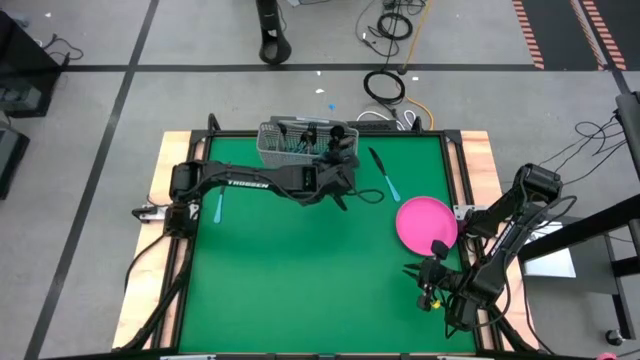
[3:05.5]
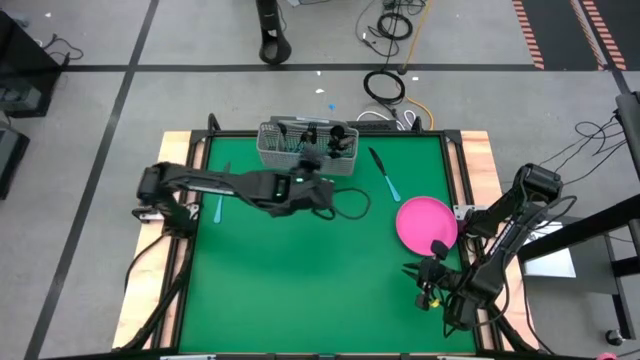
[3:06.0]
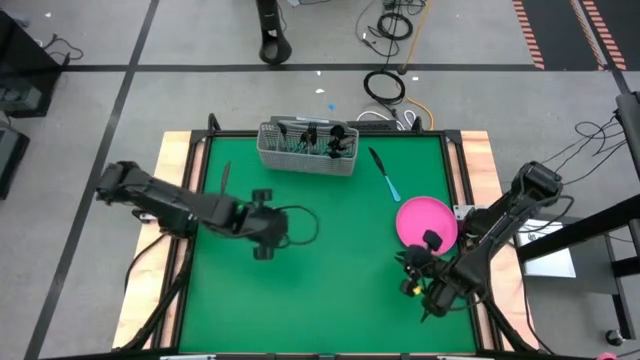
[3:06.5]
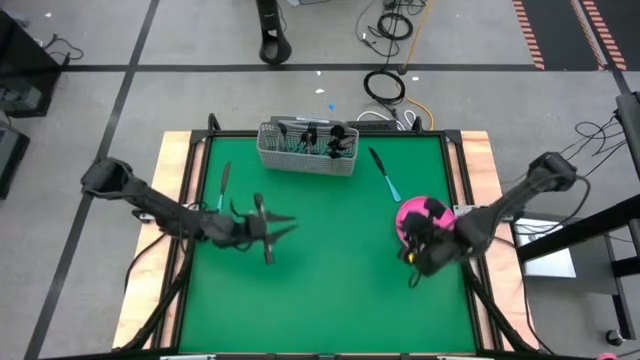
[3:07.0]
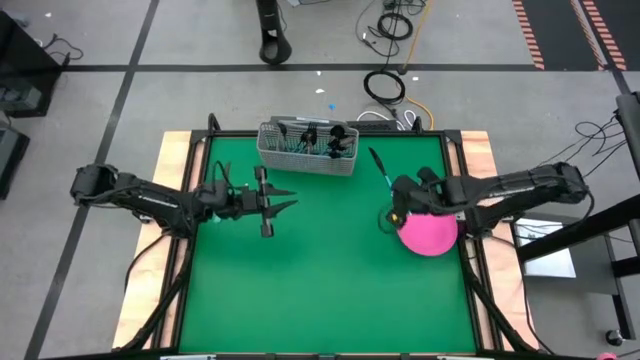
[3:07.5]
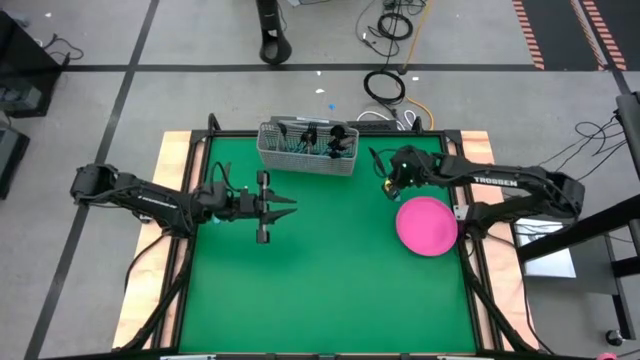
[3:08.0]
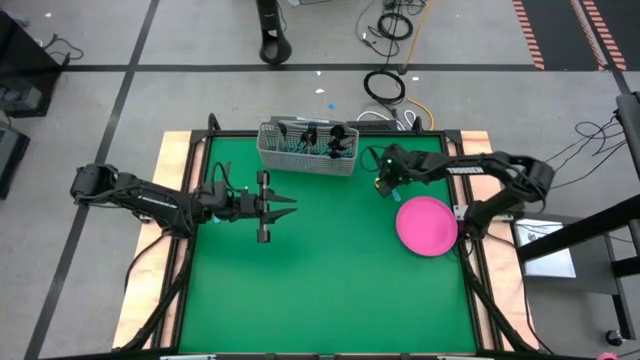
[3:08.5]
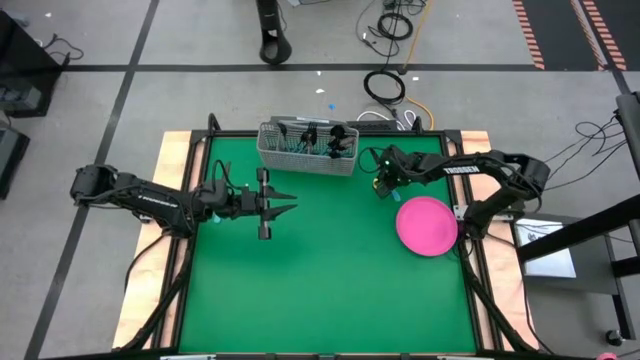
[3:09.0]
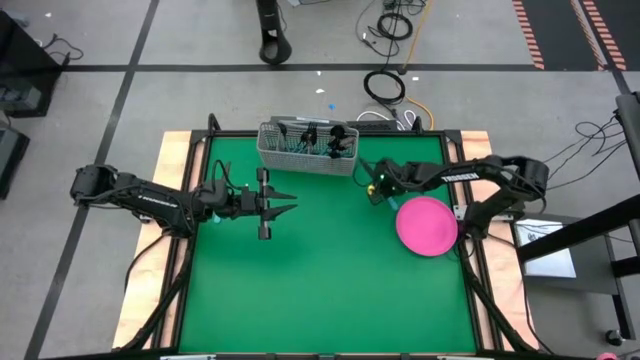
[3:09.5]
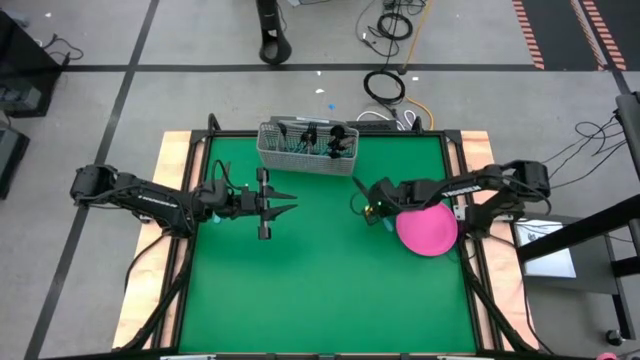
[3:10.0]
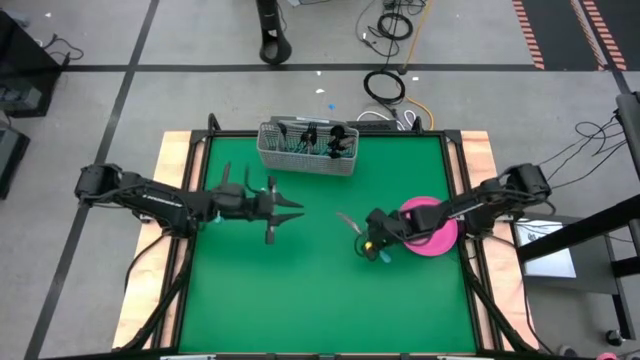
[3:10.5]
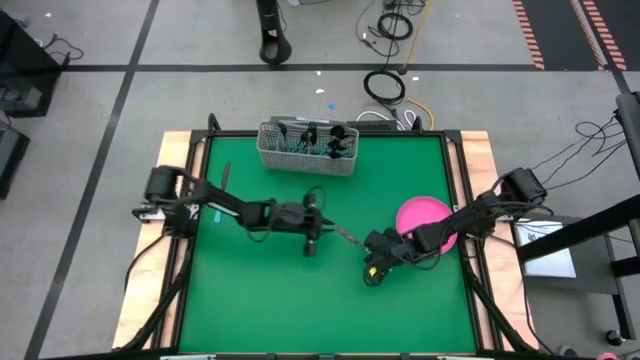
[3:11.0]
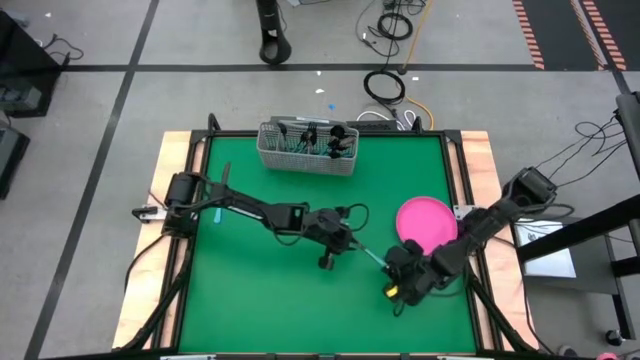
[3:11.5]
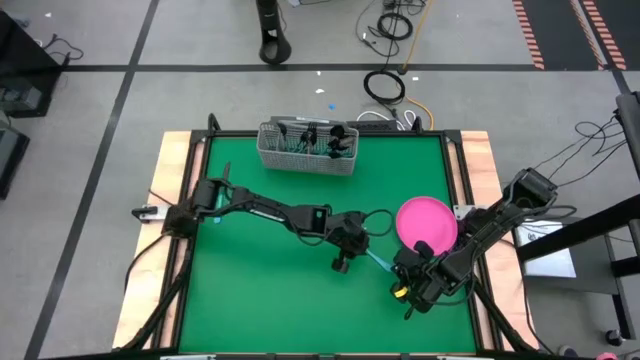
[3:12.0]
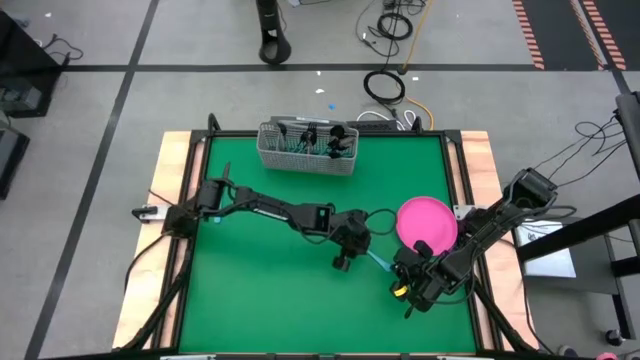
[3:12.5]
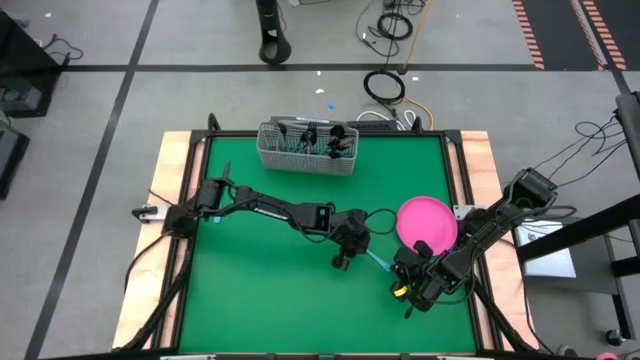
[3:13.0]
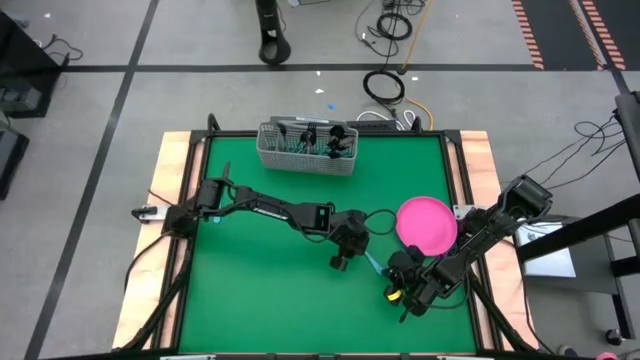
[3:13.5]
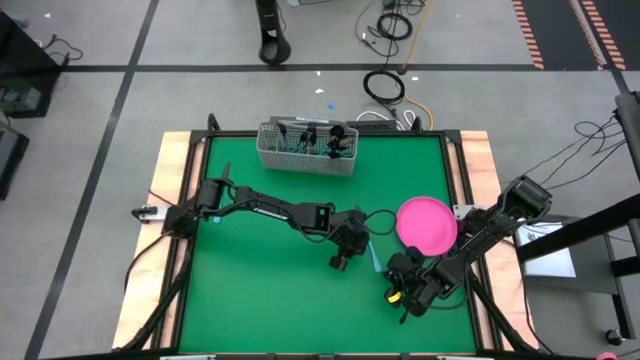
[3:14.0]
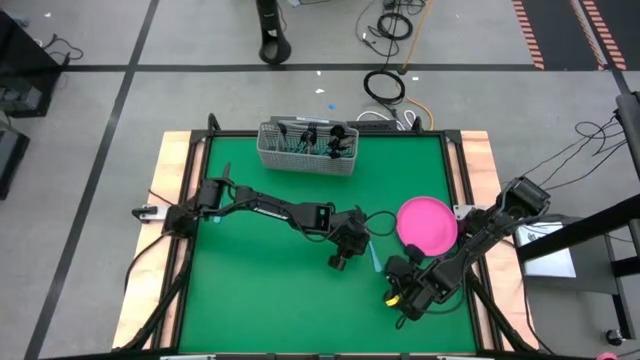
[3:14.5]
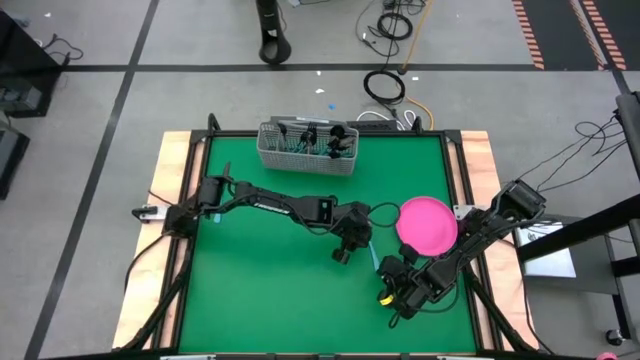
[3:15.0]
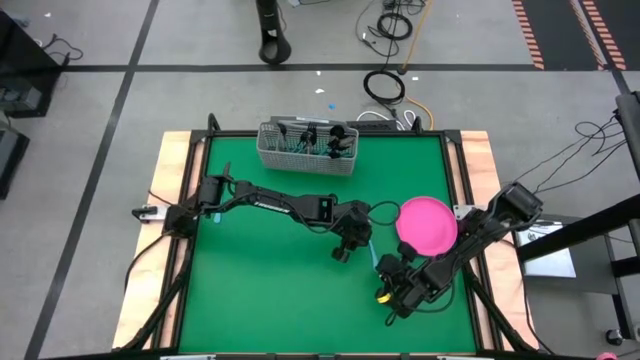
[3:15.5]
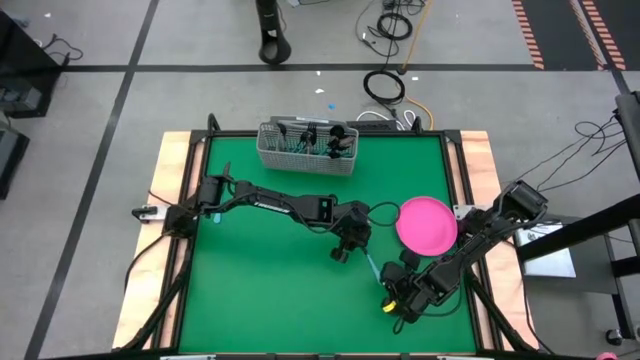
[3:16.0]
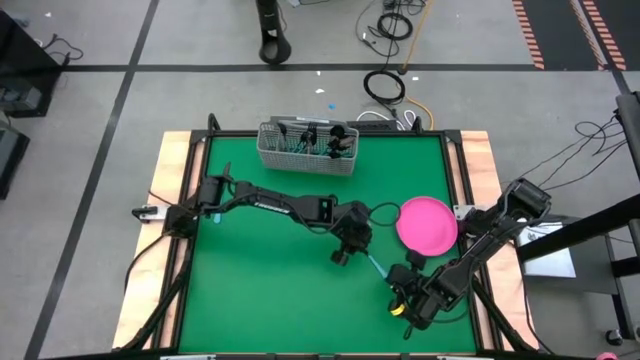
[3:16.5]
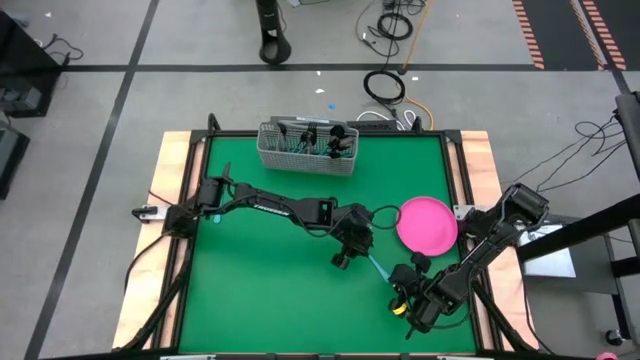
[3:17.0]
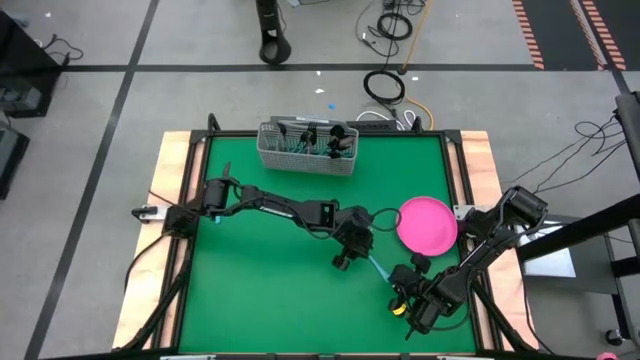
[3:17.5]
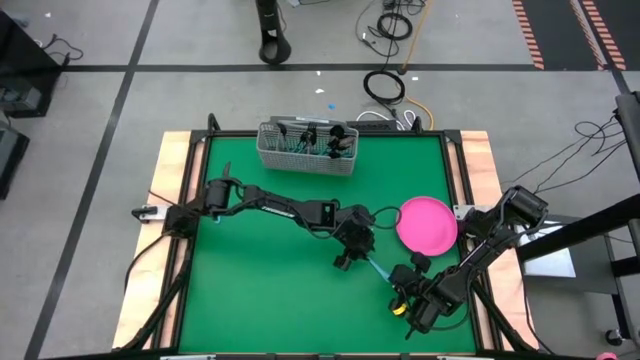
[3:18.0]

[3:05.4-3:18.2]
Task: Sort silverware
Put the blue table knife into the silverware tray with the other blue table knives

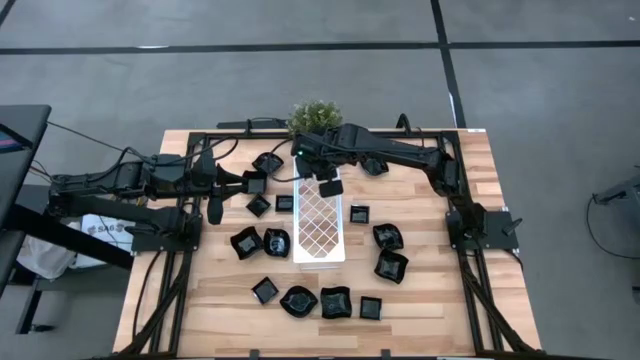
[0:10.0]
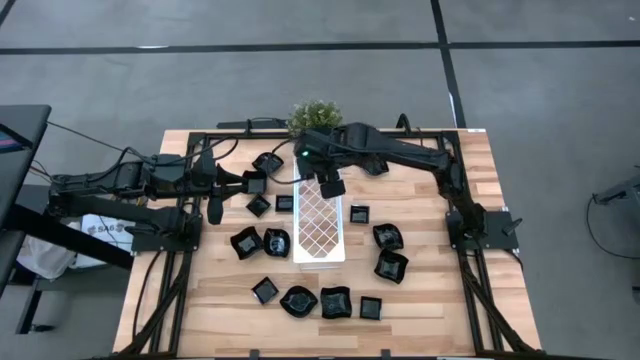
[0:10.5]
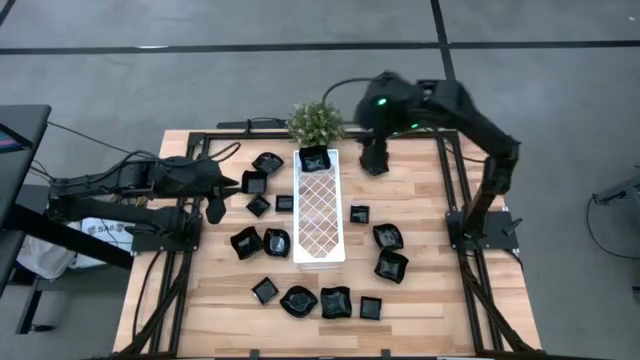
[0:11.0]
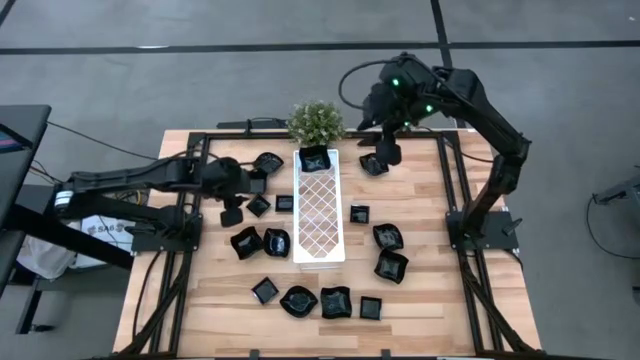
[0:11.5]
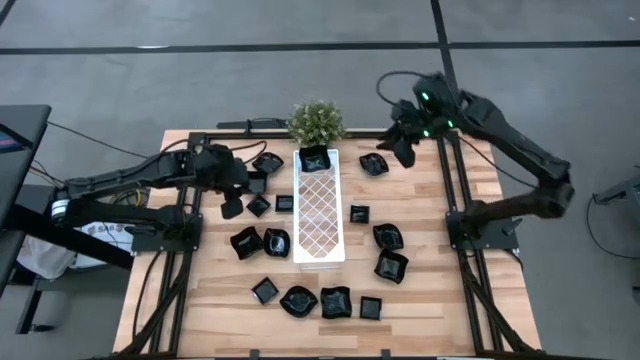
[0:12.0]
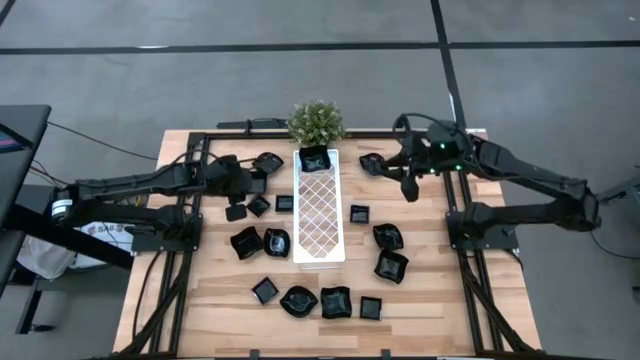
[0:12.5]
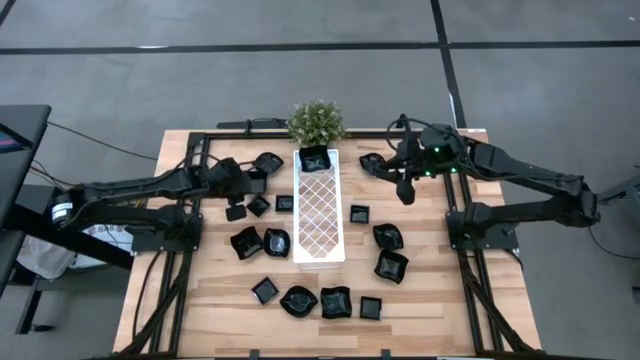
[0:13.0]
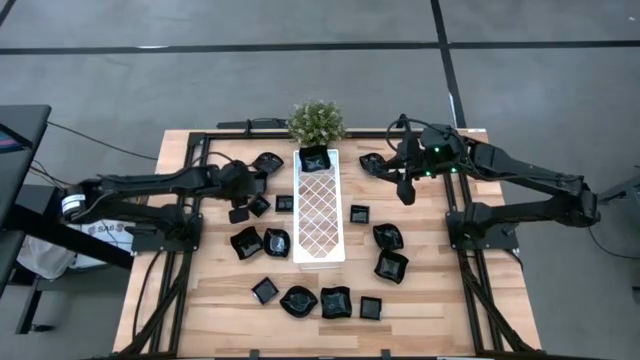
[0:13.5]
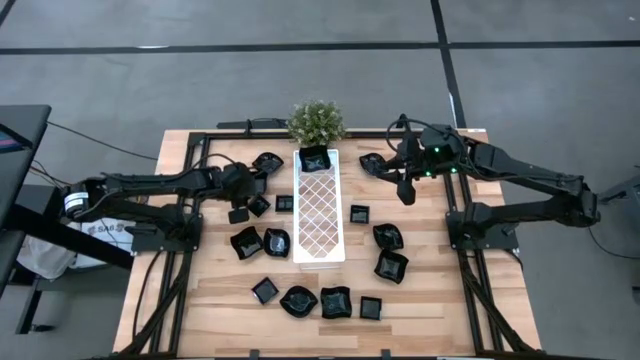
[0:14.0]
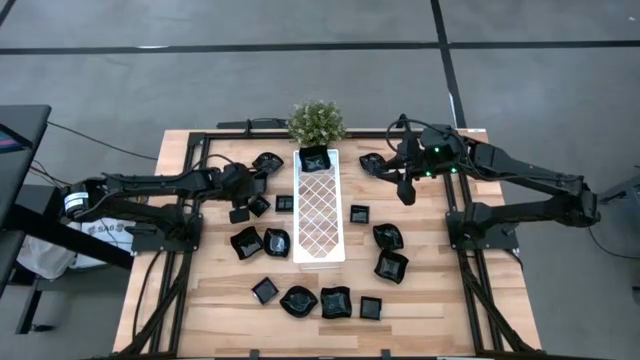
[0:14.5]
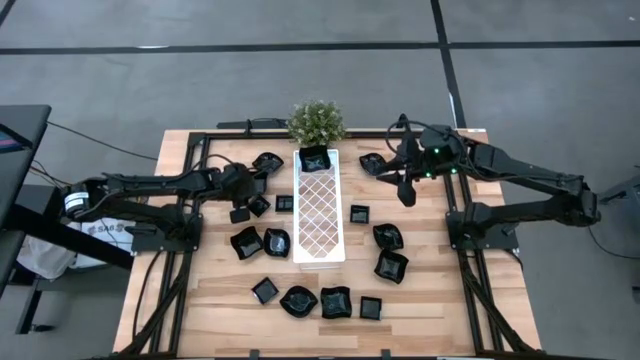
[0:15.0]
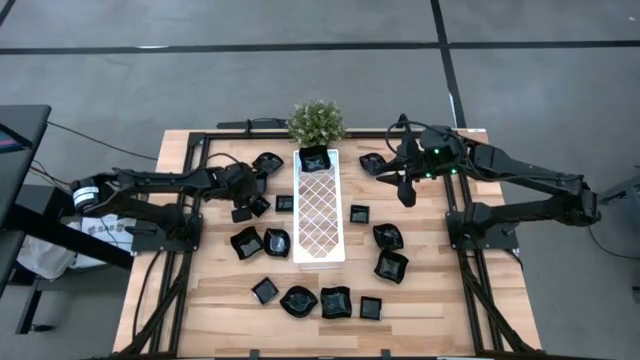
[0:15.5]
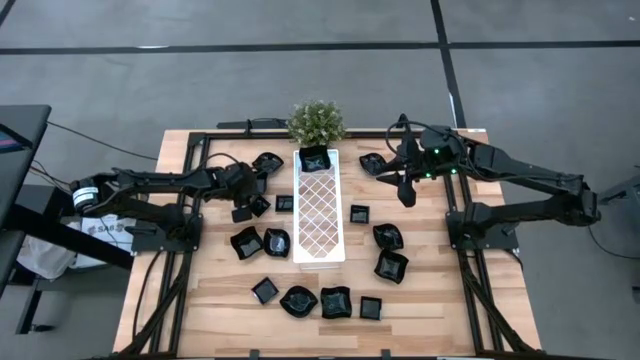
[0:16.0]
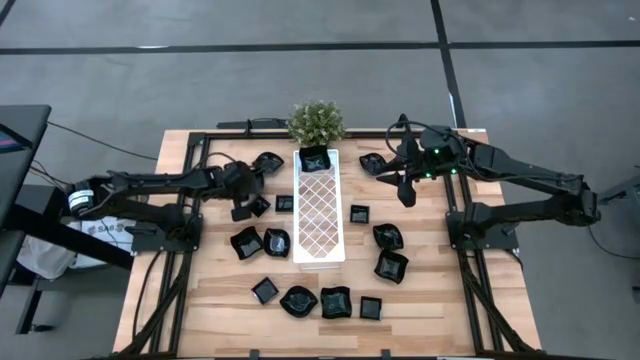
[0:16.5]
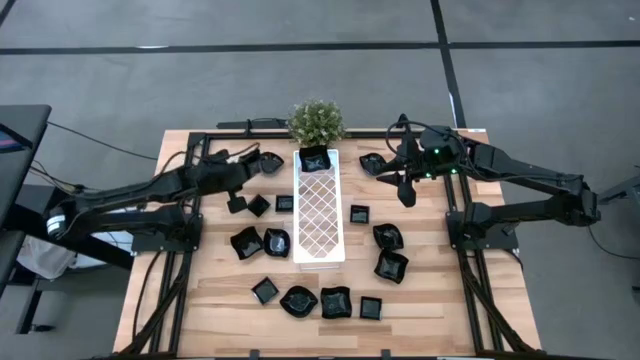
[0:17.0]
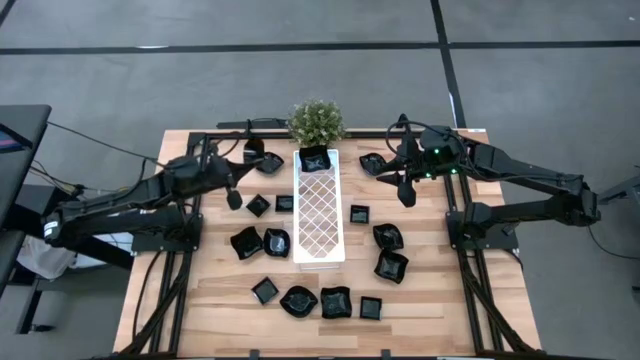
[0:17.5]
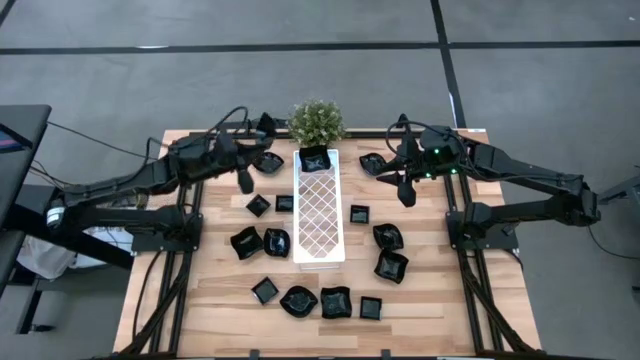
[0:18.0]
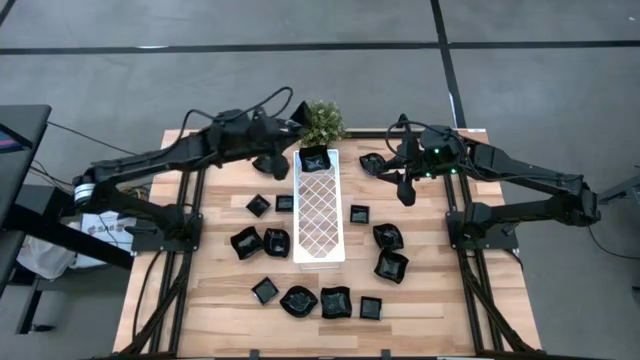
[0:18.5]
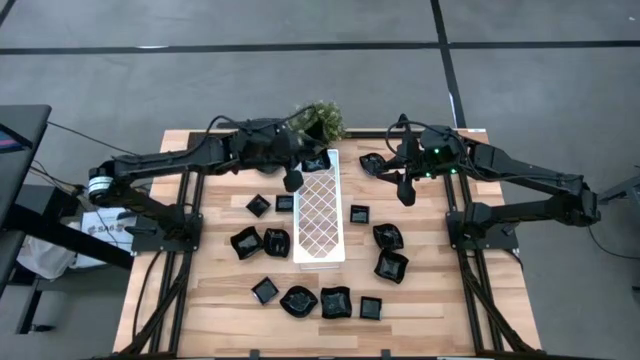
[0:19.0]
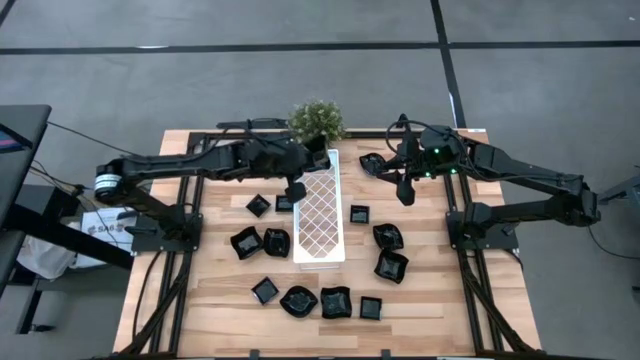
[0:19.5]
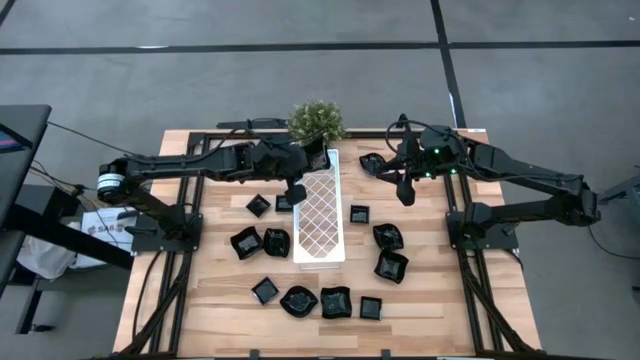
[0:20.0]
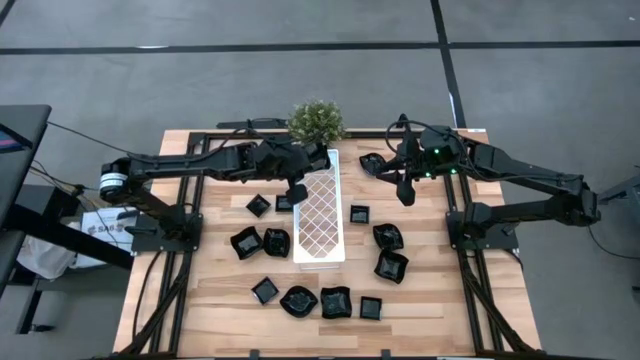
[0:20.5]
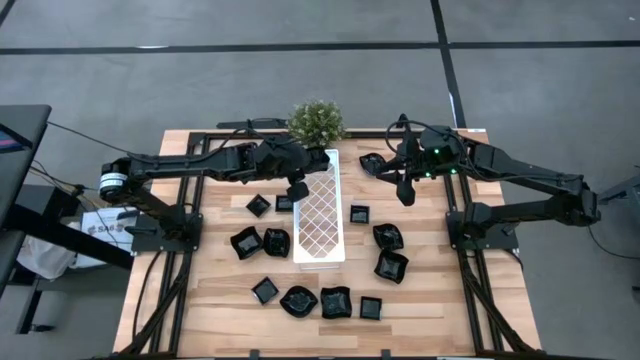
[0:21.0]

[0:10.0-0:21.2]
Task: Pick & Place Mini shaped plates
Stack the distorted square plate on the other distorted square plate on the shelf
